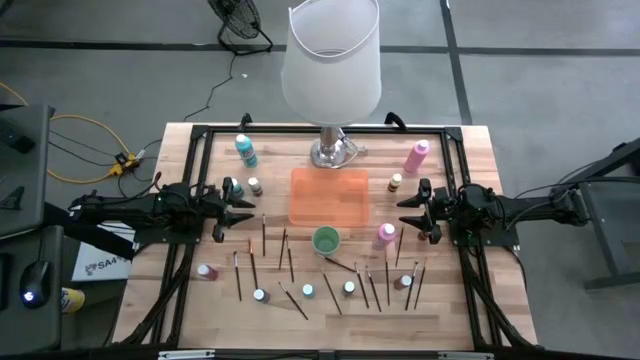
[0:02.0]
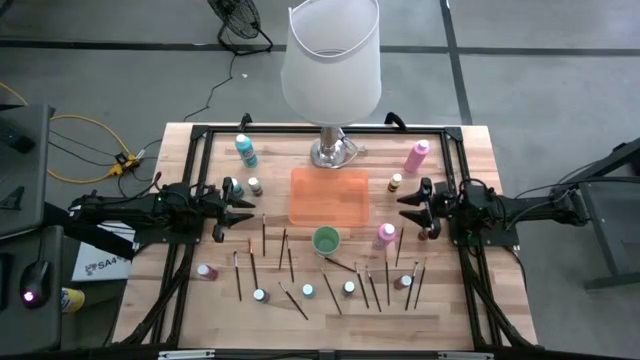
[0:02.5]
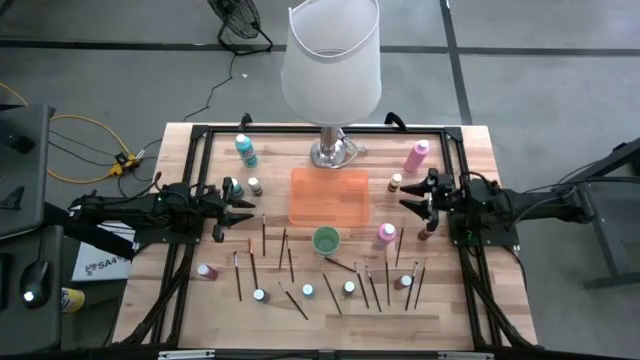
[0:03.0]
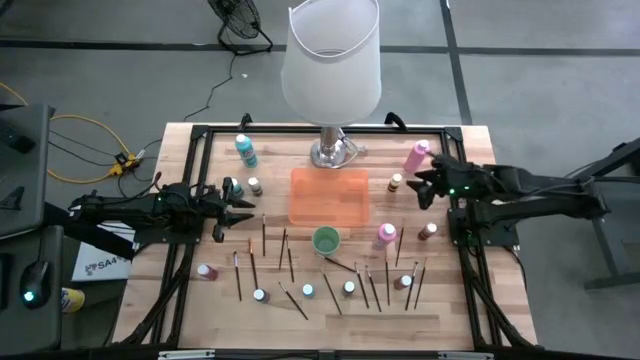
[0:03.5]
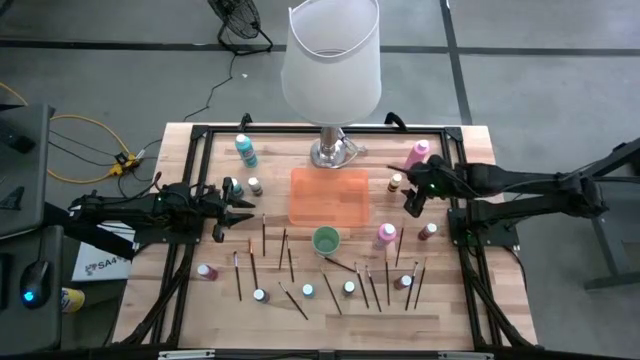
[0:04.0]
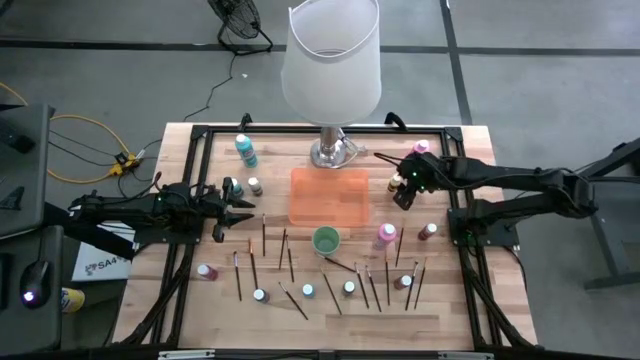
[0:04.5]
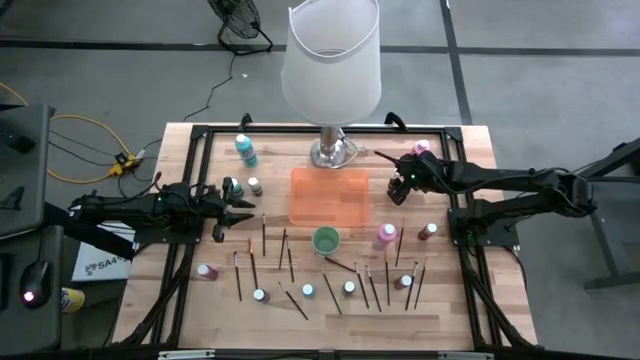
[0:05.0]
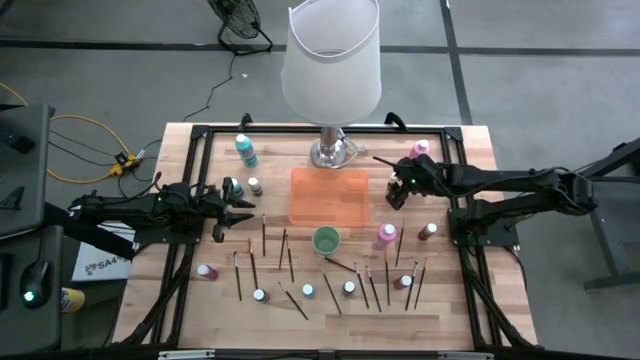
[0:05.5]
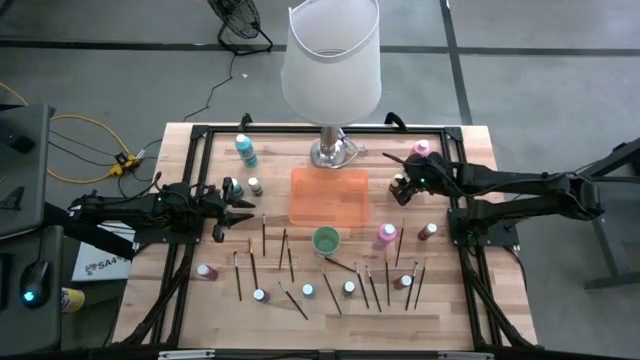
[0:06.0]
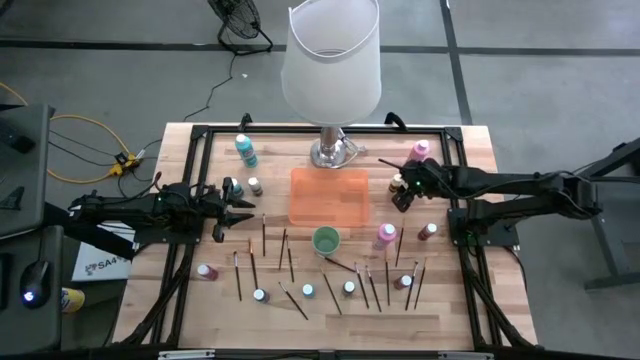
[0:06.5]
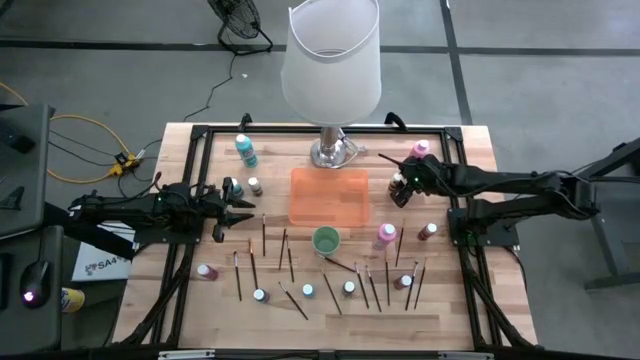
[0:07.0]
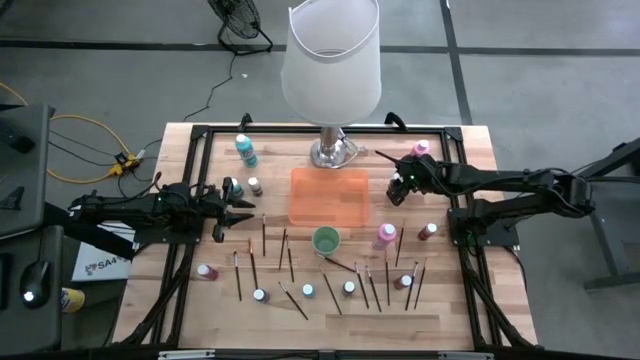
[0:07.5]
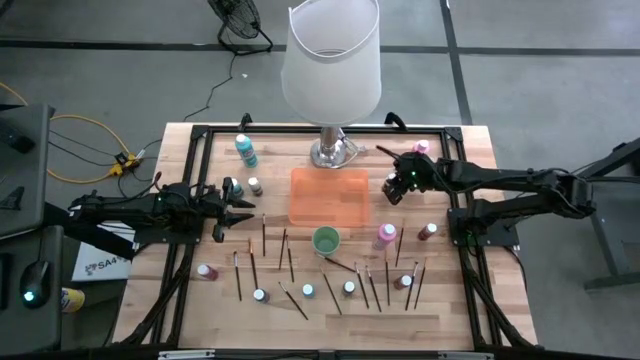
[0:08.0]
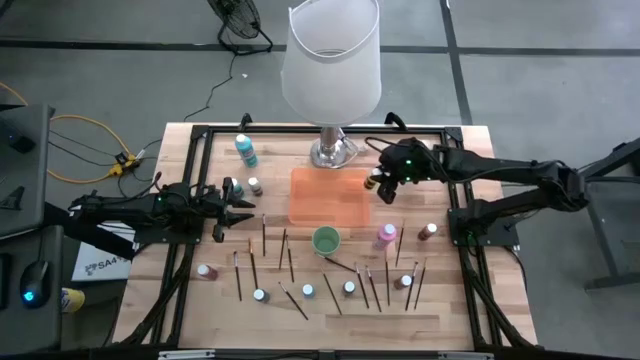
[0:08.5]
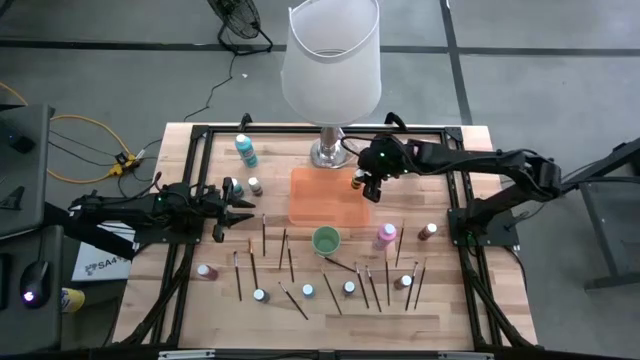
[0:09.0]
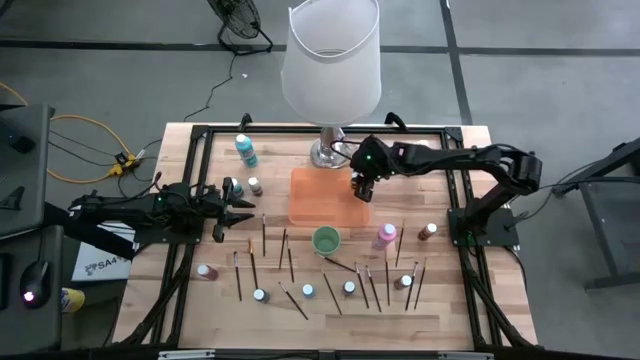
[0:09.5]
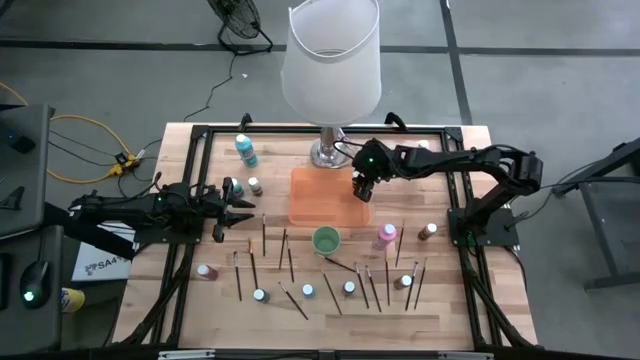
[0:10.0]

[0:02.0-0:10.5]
Task: Pick & Place Paint Supplies
Put the small yellow paint bottle into the orange bin

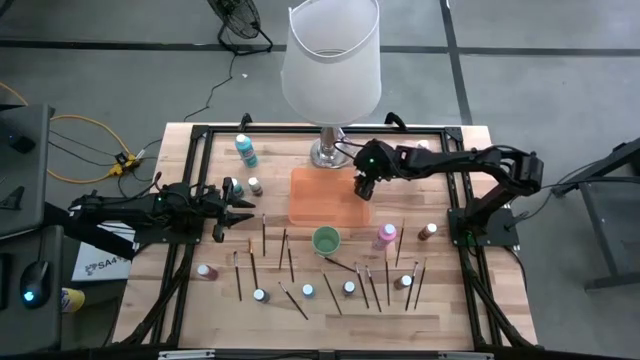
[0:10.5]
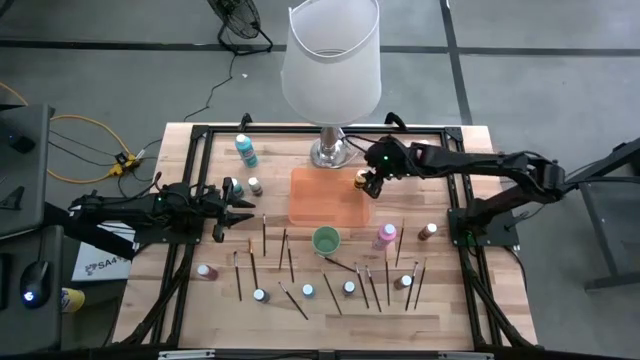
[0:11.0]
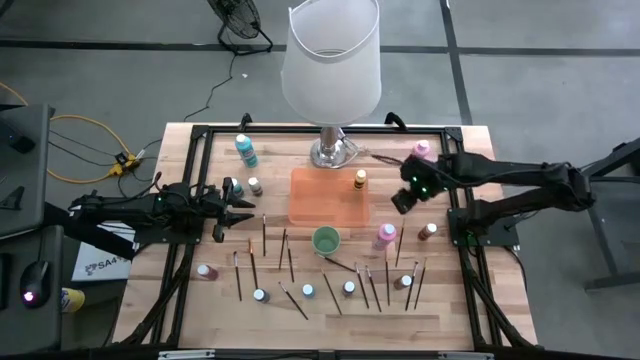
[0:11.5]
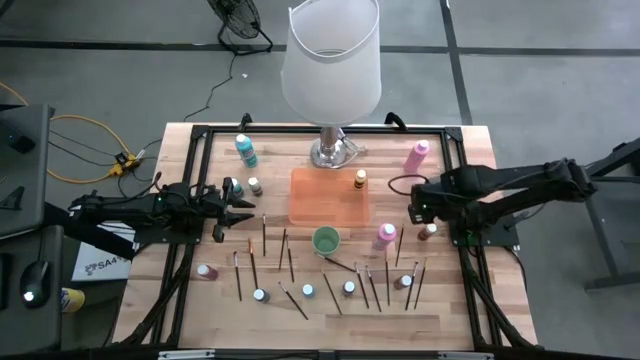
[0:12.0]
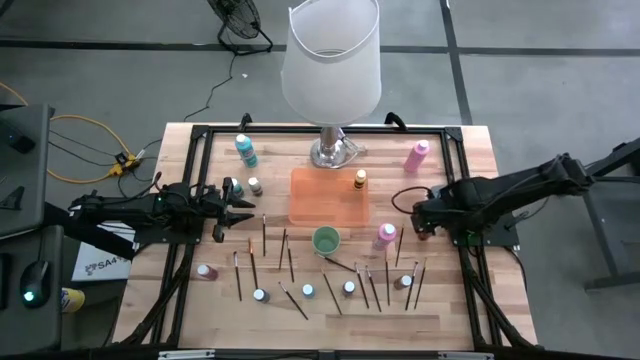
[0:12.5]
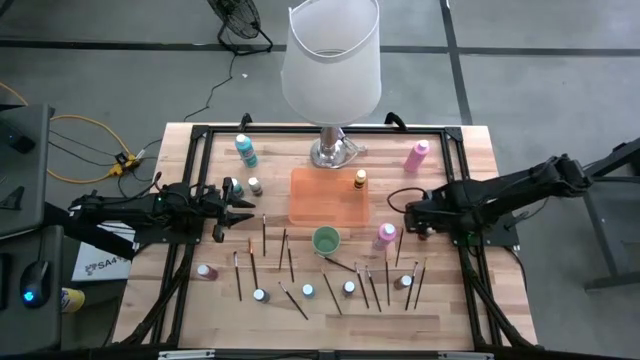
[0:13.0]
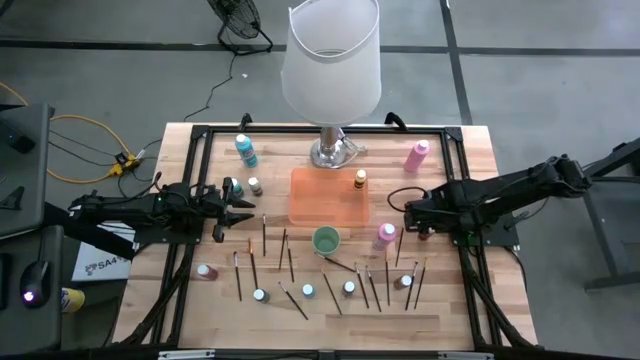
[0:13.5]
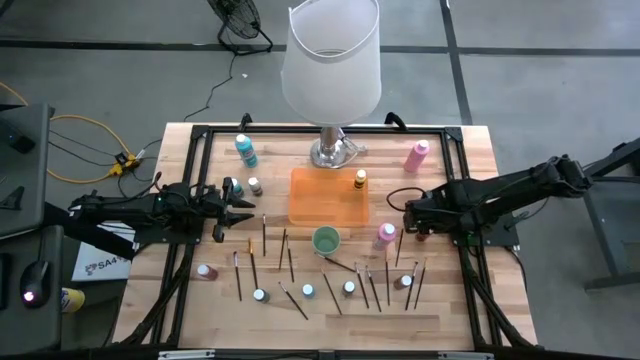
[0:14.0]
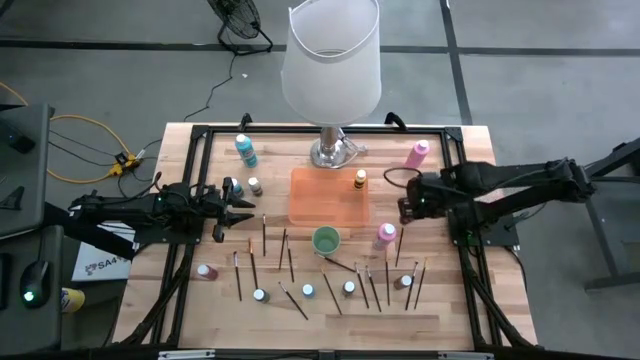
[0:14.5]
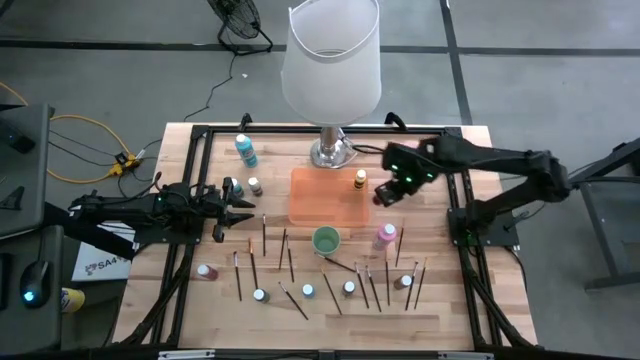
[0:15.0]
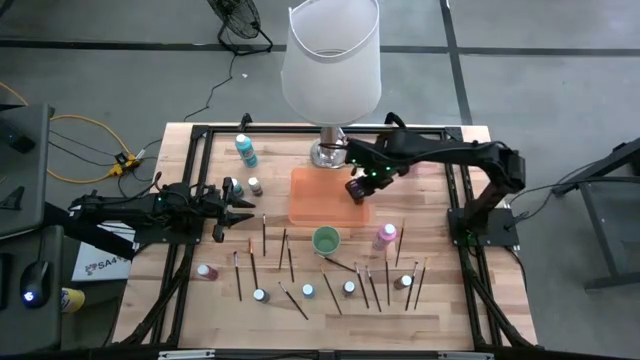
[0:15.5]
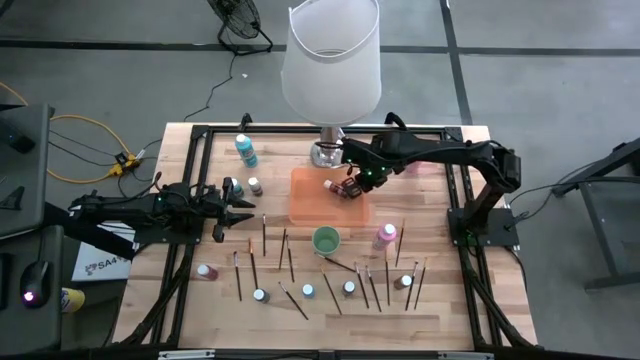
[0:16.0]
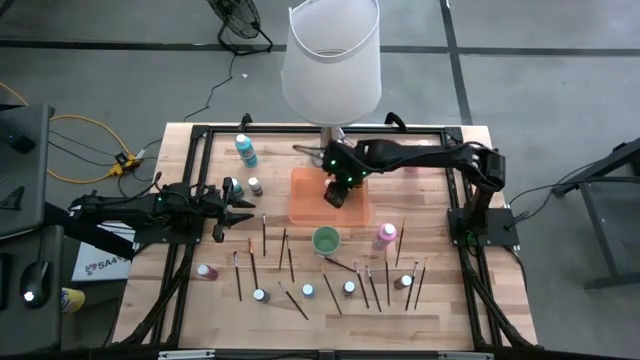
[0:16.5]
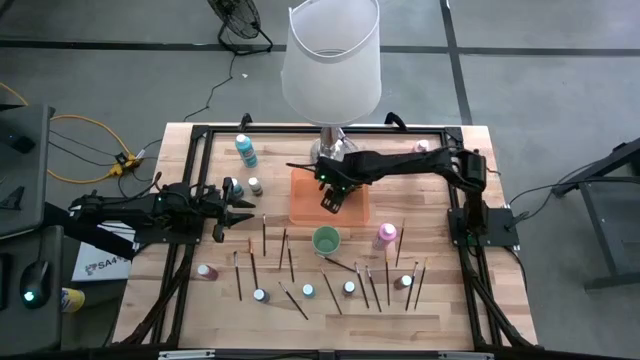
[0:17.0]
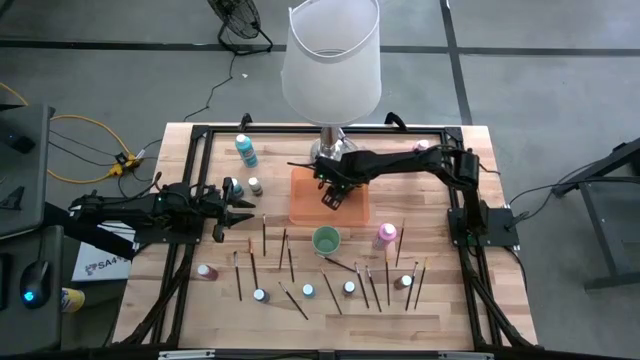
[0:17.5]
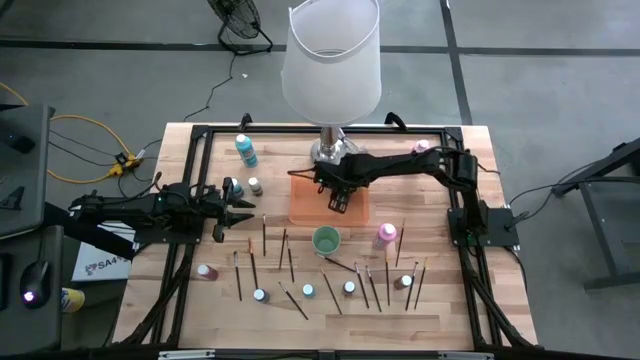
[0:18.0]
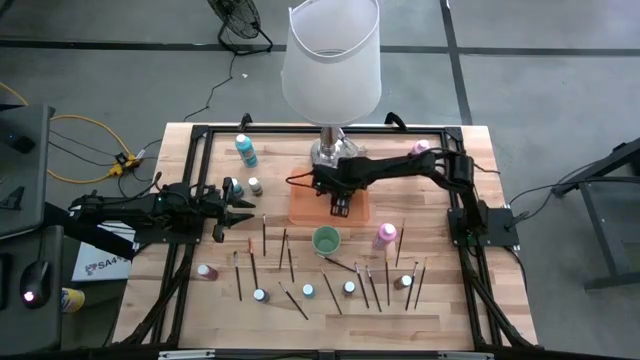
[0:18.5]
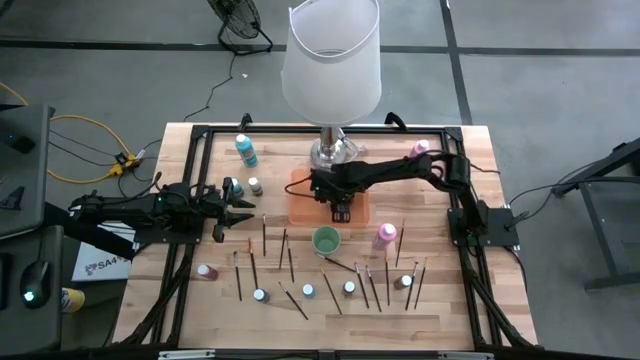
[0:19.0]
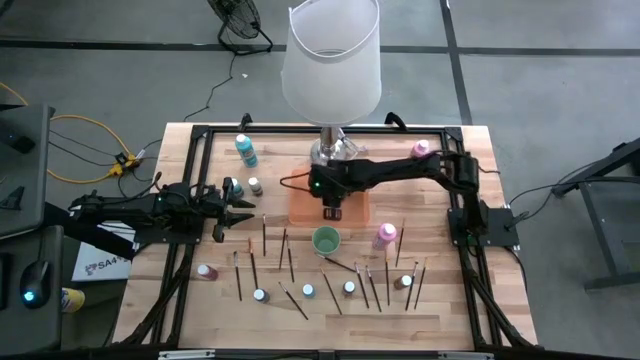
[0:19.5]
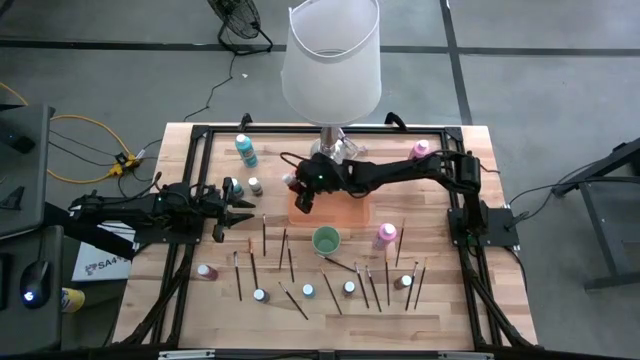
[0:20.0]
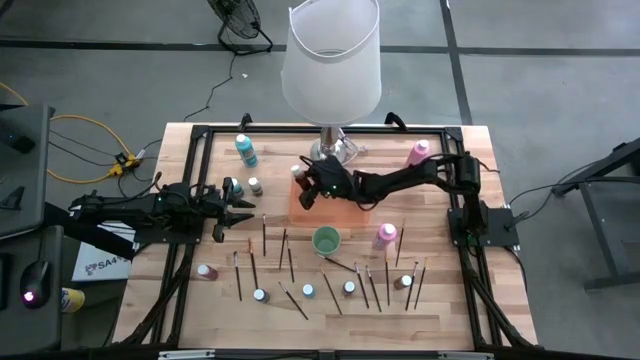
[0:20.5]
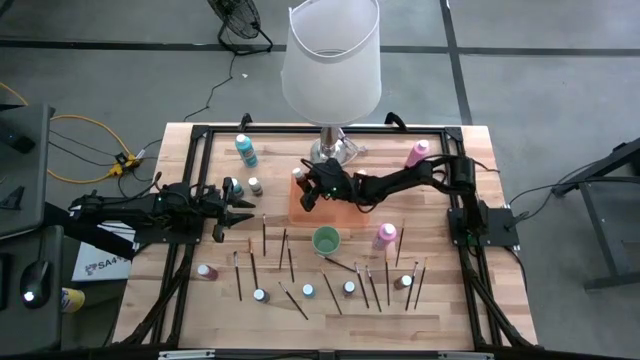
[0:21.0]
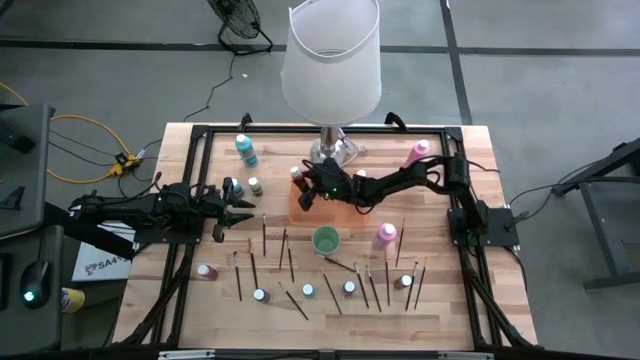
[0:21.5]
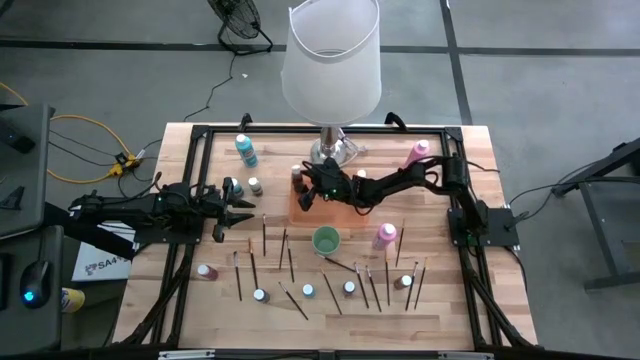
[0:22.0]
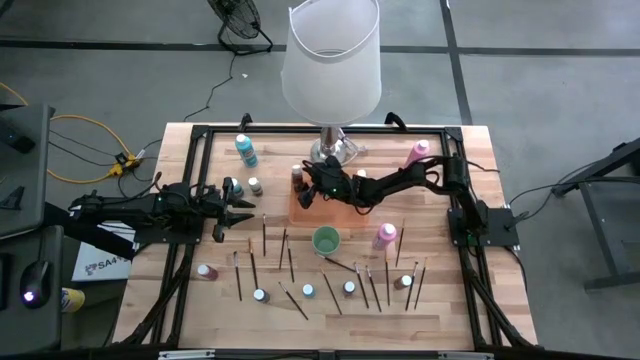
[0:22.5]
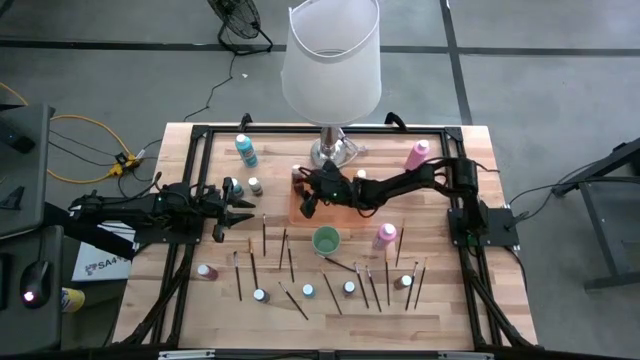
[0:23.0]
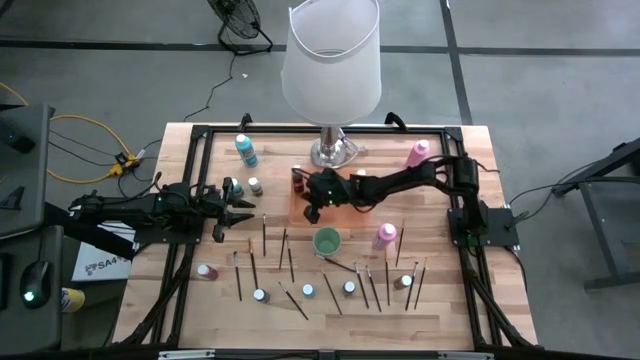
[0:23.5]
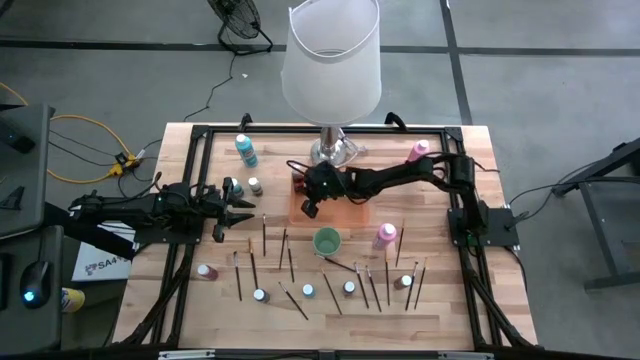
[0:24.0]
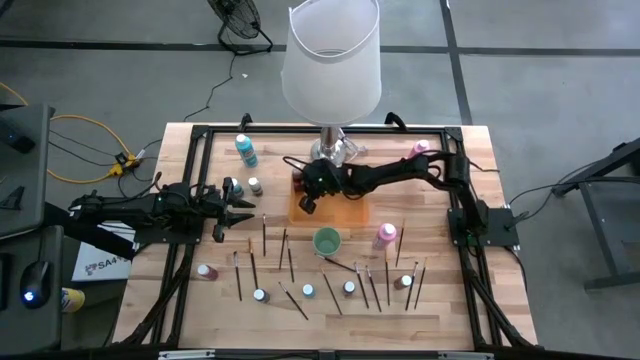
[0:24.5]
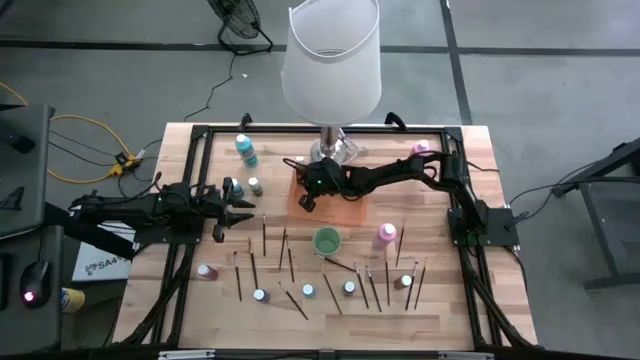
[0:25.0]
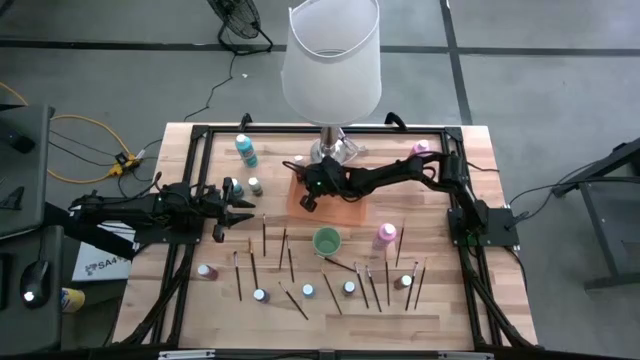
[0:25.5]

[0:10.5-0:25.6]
Put the small brown paint bottle into the orange bin
